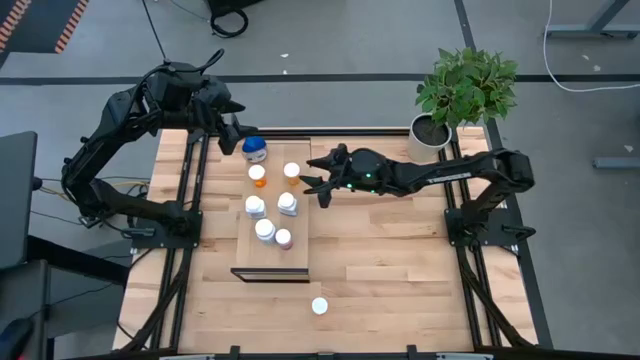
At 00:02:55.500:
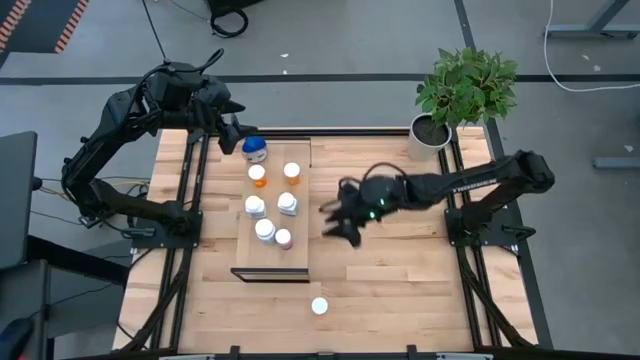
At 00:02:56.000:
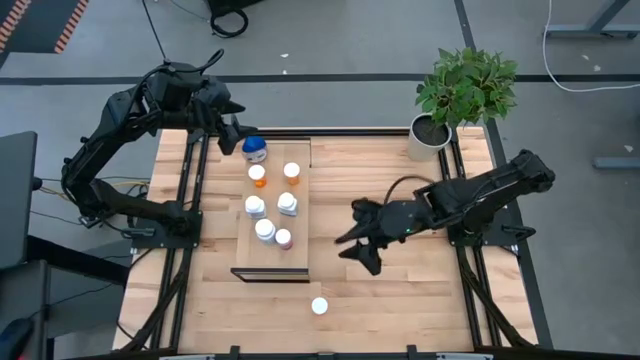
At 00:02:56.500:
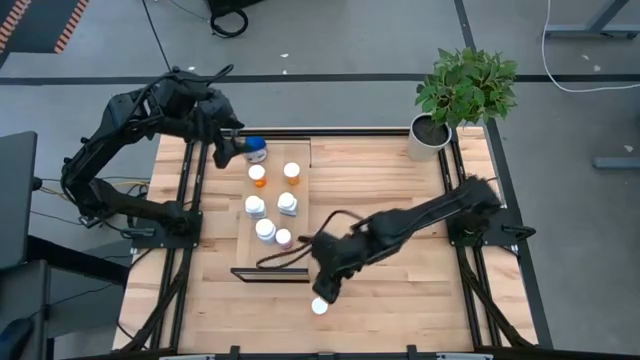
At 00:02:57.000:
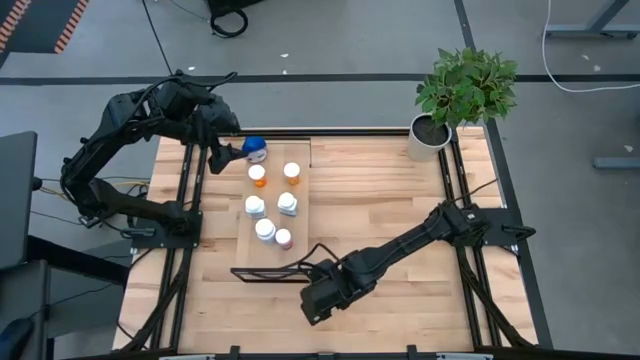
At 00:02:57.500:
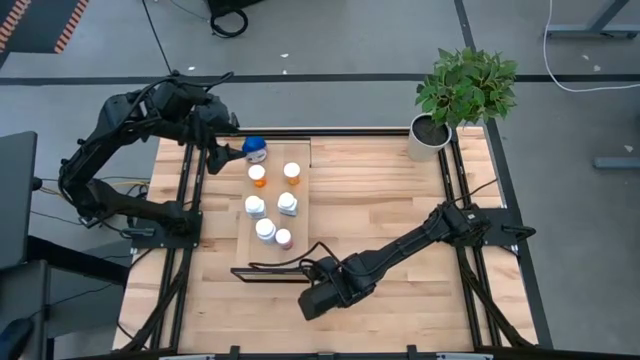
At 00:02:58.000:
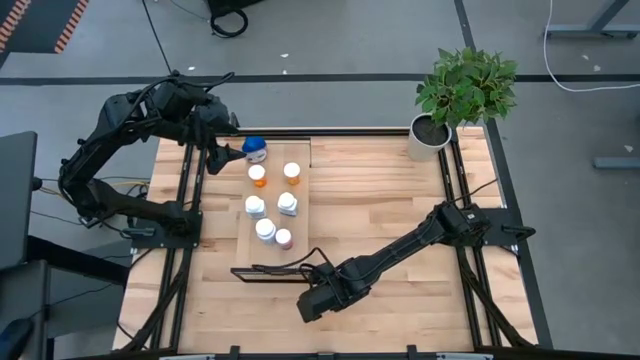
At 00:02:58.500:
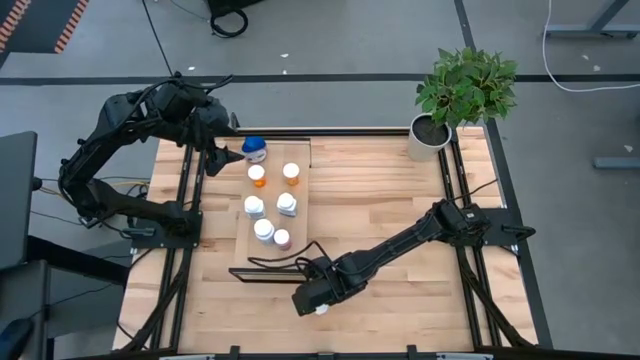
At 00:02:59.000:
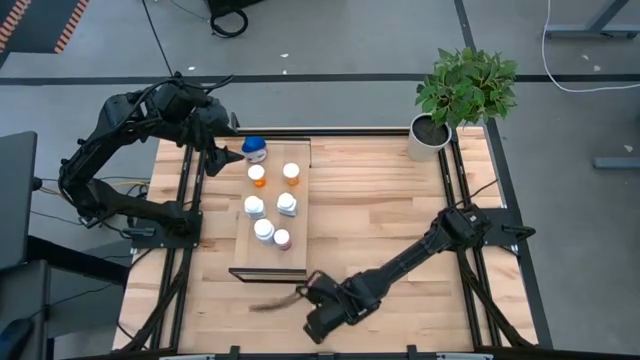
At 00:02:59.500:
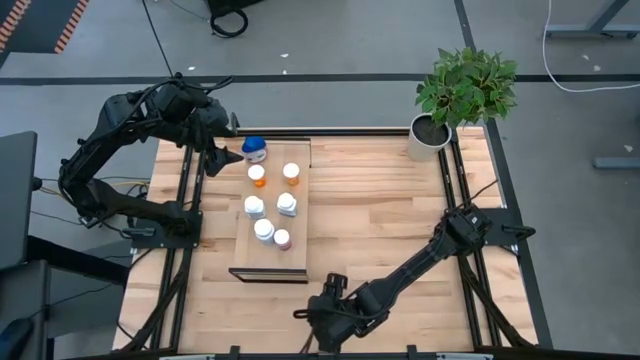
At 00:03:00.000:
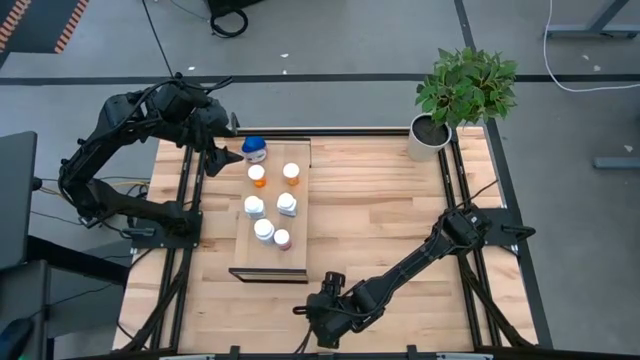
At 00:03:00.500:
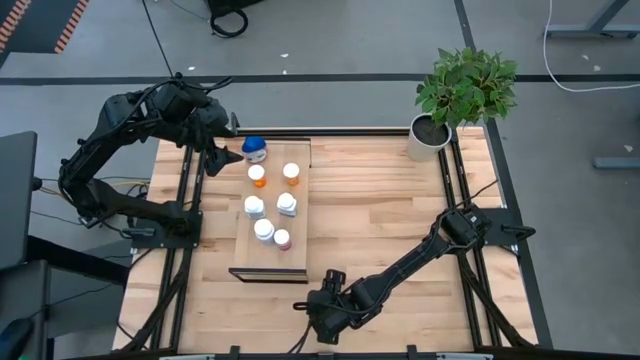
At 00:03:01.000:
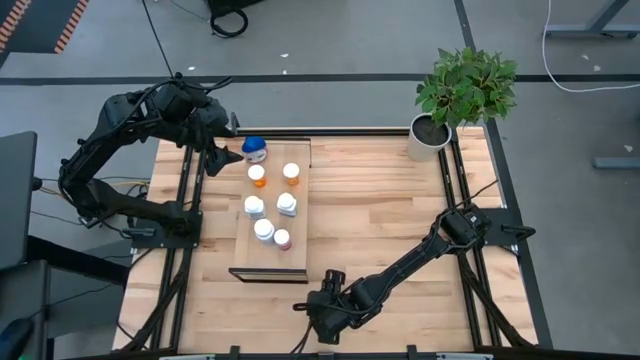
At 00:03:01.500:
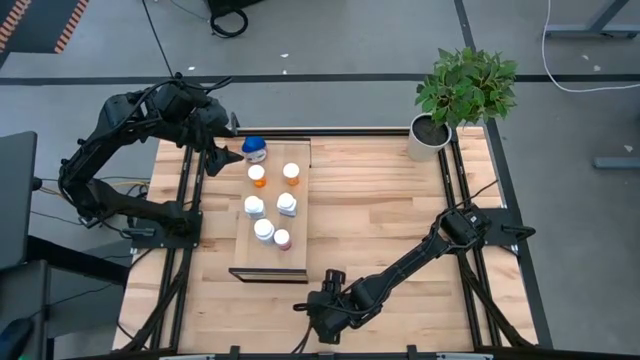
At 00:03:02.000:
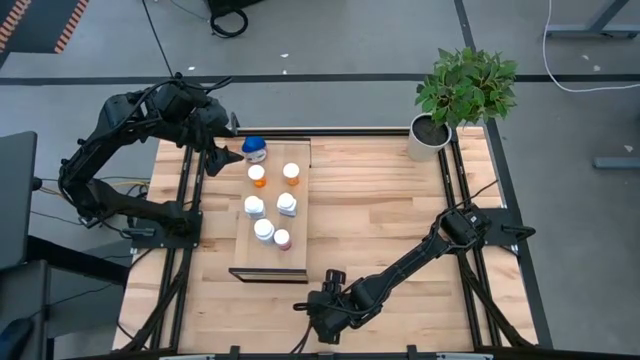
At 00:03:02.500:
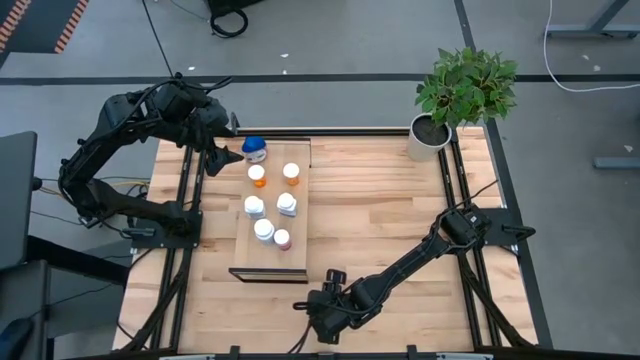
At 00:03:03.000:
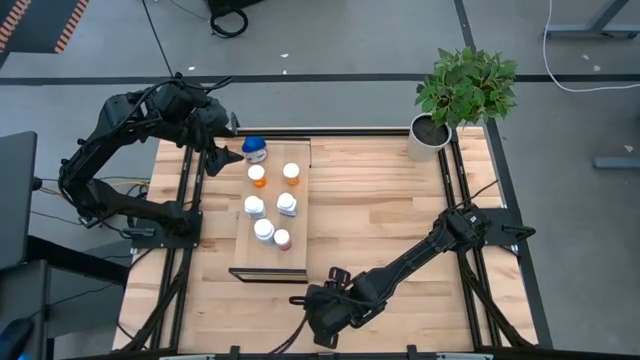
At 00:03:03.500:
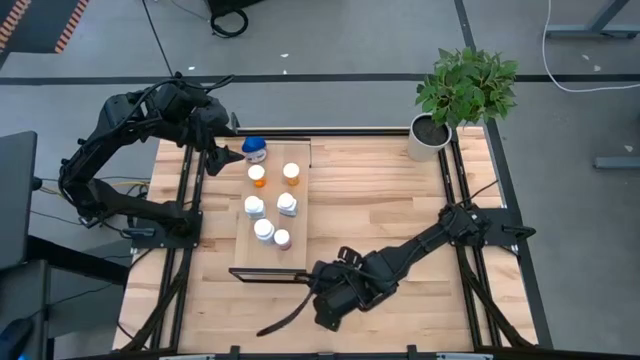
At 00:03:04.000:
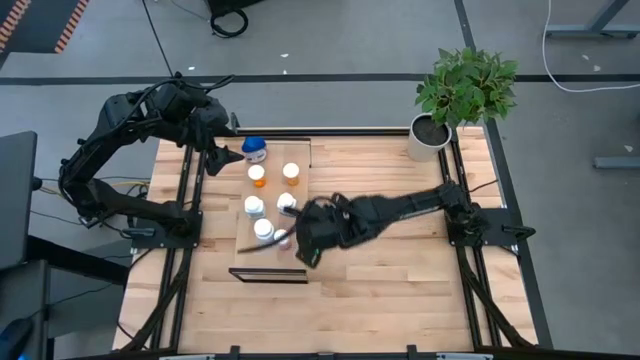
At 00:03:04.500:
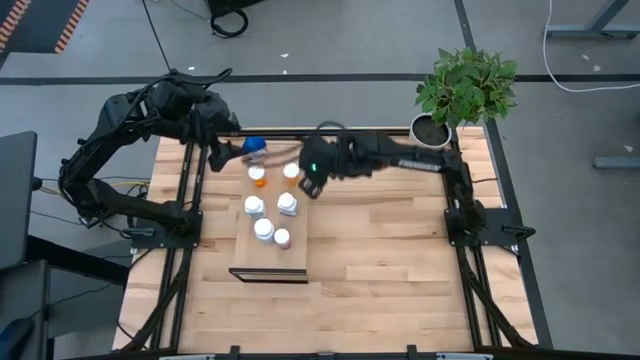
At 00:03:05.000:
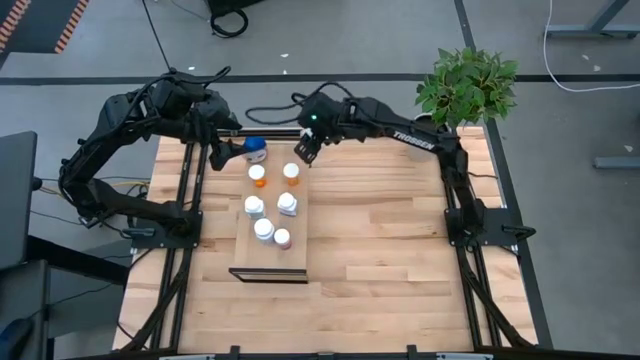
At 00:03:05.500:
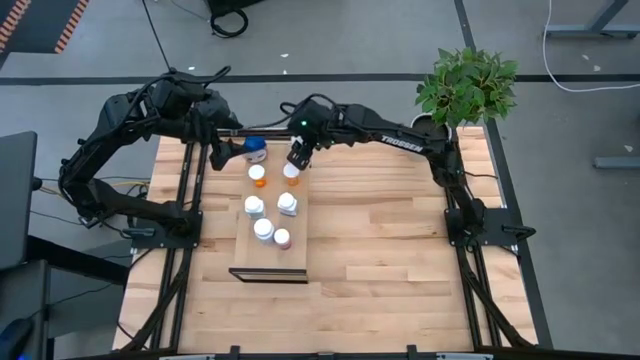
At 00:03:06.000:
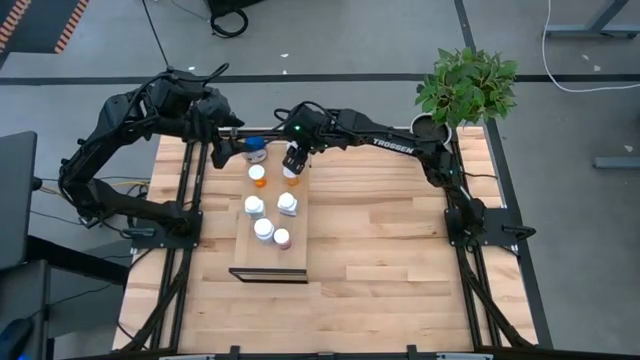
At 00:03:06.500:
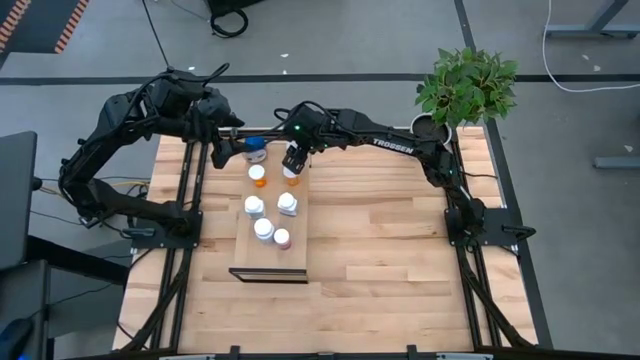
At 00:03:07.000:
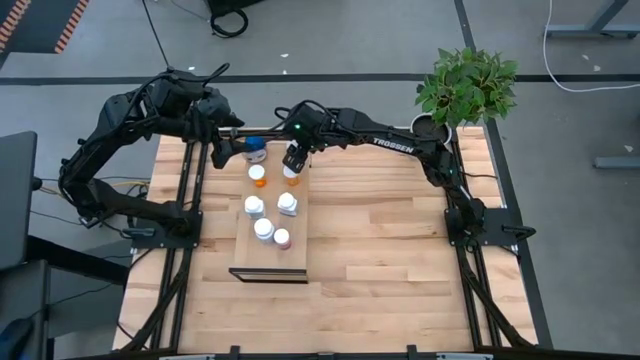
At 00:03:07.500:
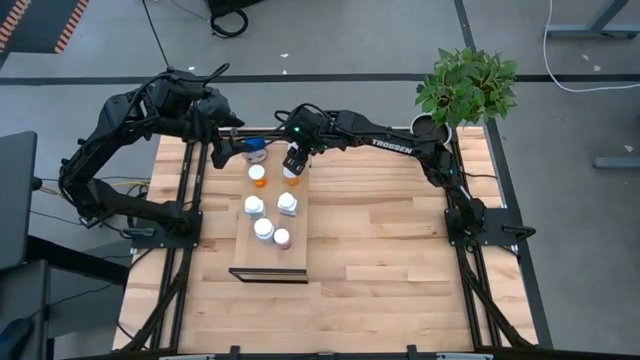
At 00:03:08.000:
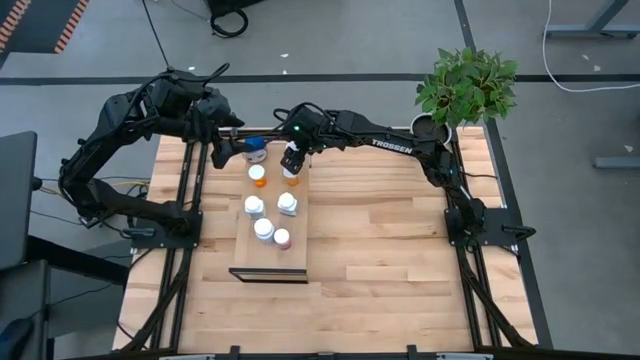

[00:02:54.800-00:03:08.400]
Task: Pick and place medicine bottles onto shelf by color
Put the orange pill bottle on the shelf

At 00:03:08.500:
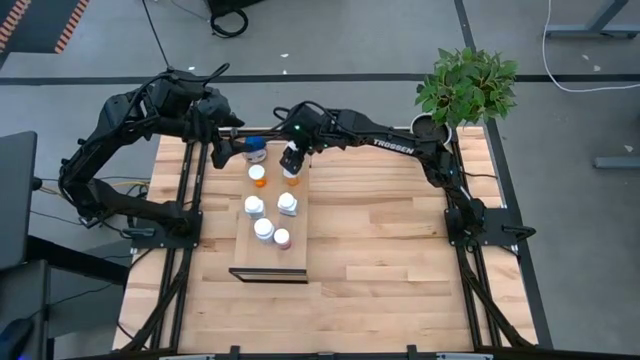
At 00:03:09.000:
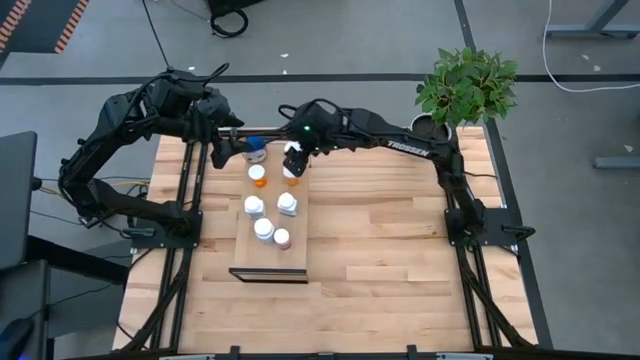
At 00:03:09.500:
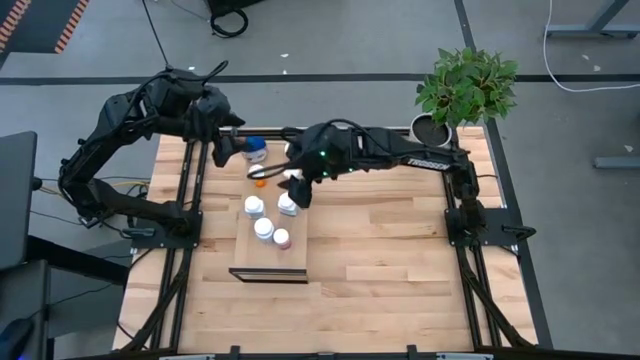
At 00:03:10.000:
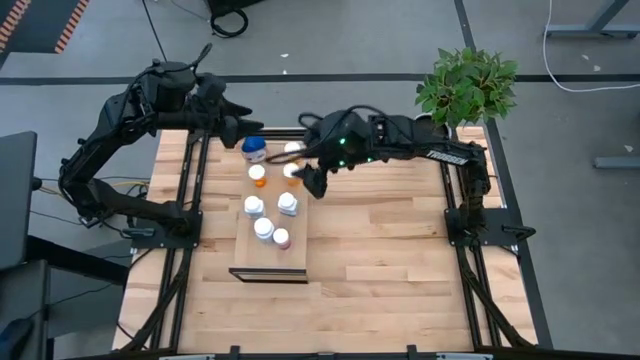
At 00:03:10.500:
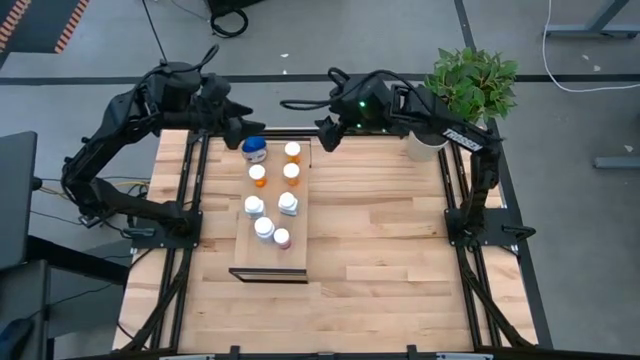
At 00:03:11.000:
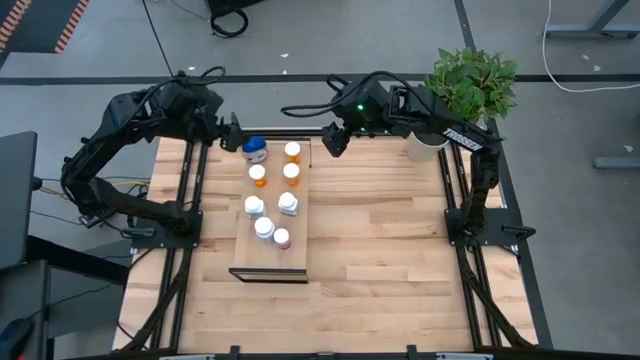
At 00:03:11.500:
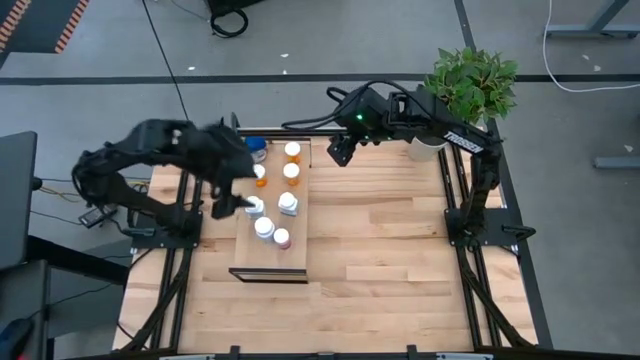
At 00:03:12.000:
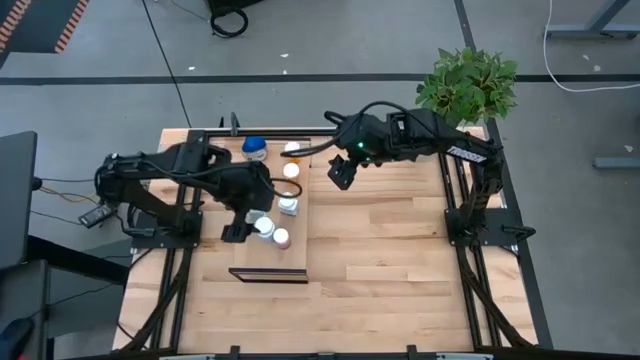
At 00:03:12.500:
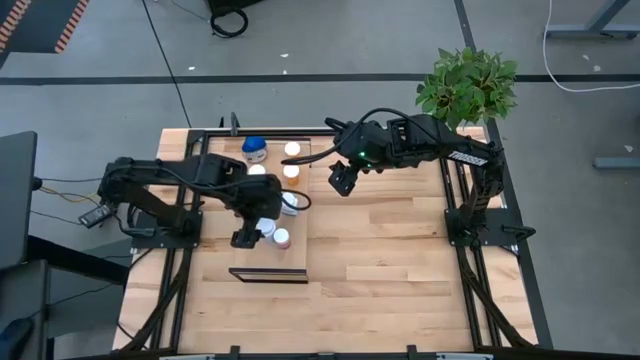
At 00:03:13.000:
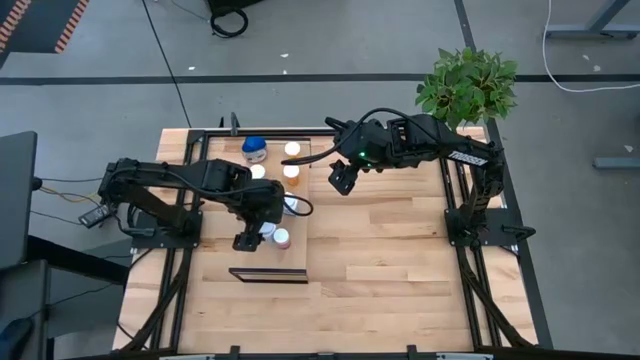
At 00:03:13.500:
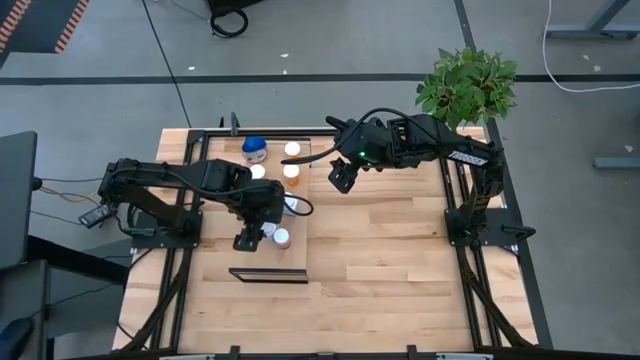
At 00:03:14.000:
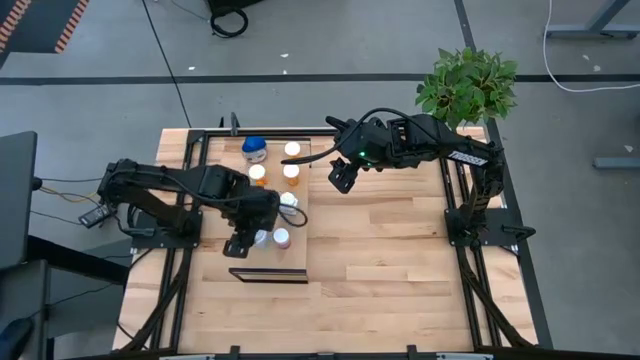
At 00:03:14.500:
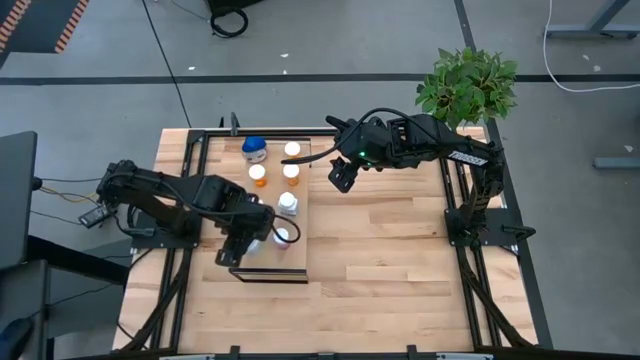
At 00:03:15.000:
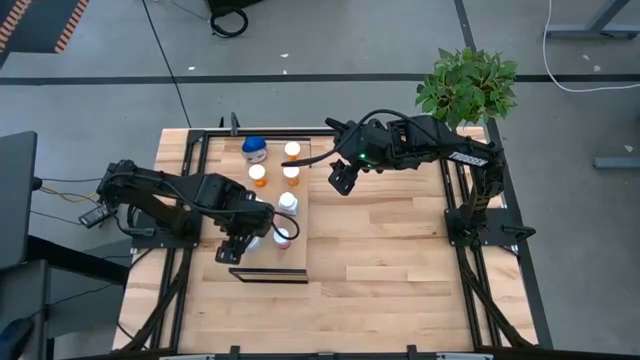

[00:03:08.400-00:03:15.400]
Adjust the white pill bottle on the shelf

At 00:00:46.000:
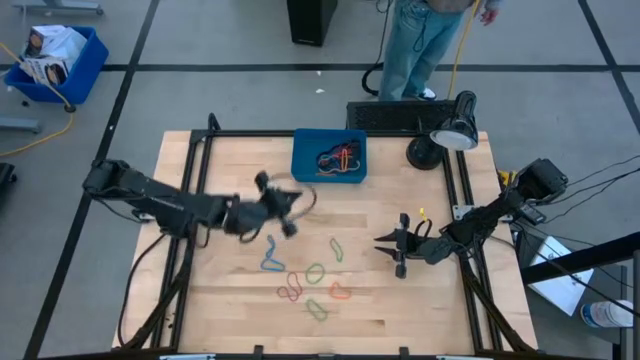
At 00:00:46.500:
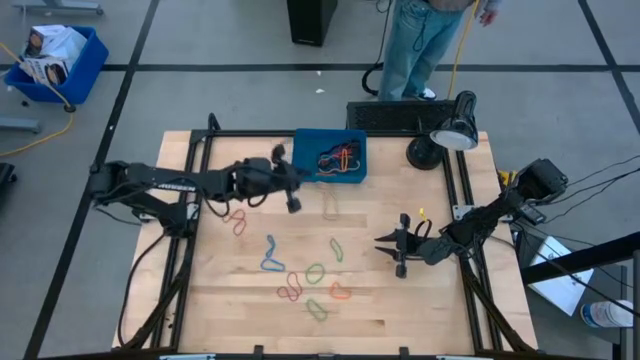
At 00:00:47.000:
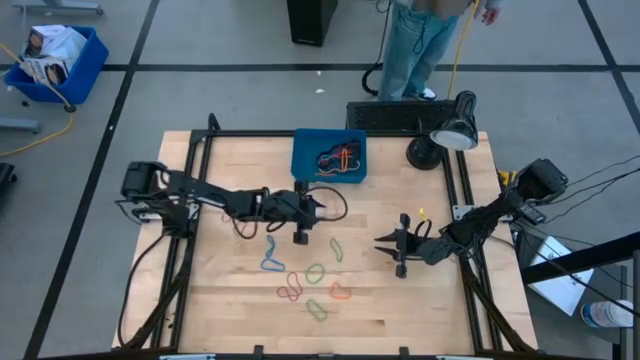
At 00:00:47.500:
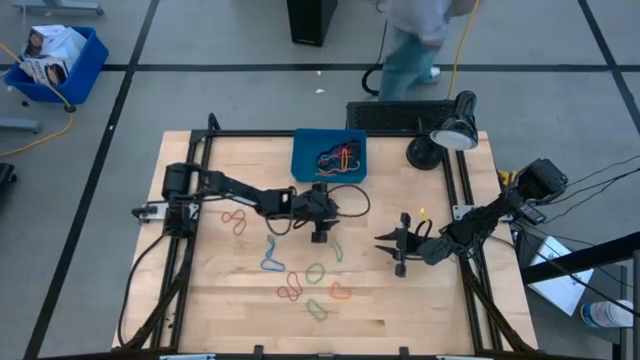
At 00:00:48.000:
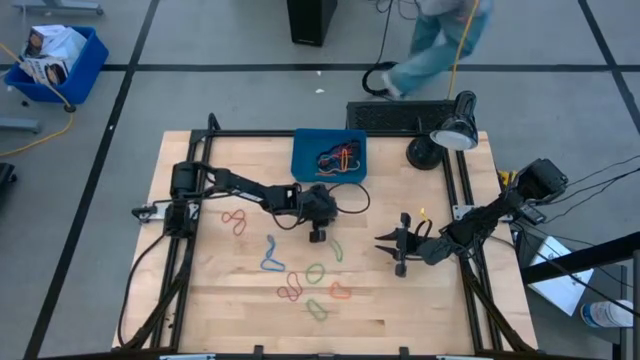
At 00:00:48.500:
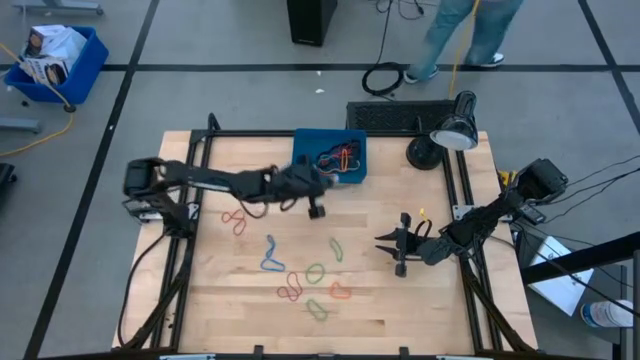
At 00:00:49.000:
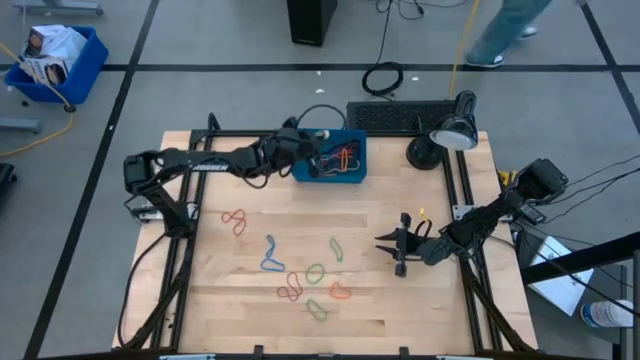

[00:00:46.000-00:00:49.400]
Task: Pick and place rubber bands into bin
Put the brown rubber band into the blue bin
